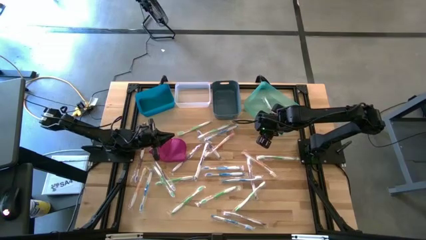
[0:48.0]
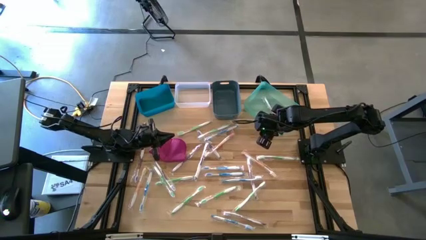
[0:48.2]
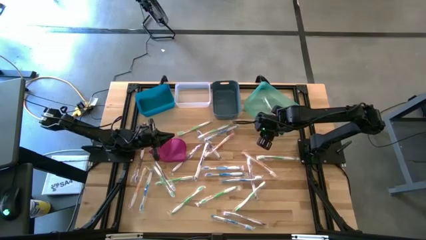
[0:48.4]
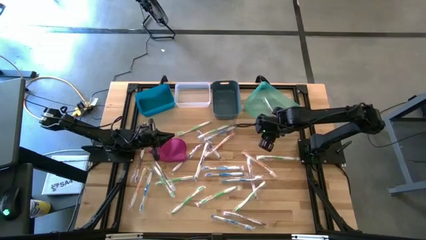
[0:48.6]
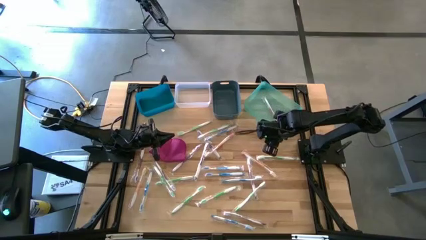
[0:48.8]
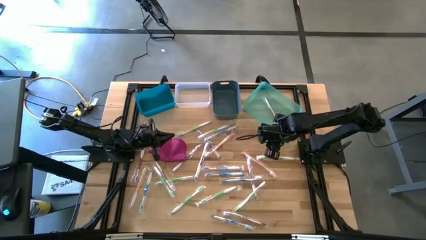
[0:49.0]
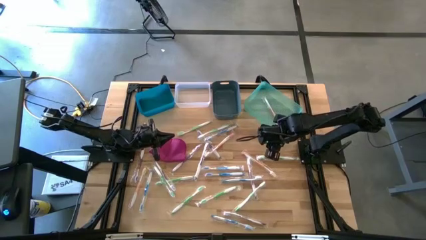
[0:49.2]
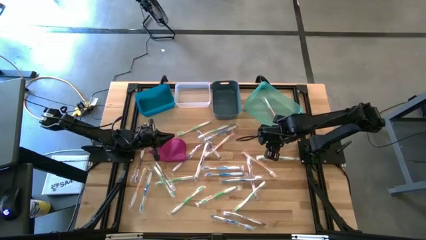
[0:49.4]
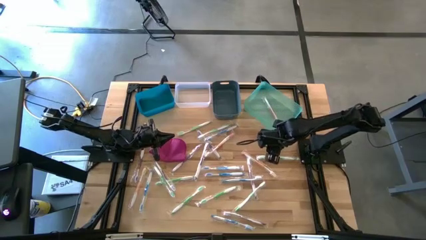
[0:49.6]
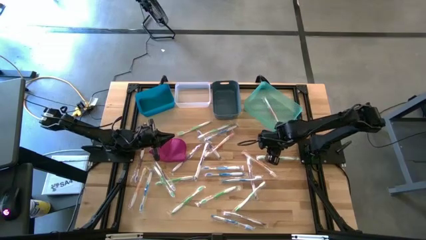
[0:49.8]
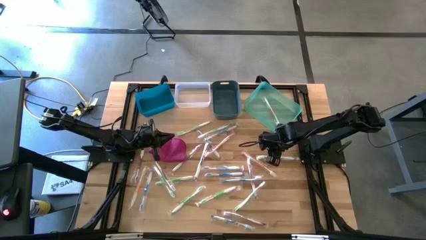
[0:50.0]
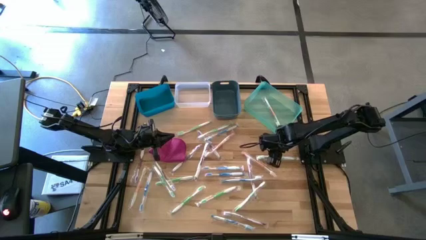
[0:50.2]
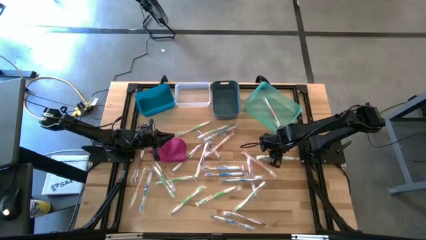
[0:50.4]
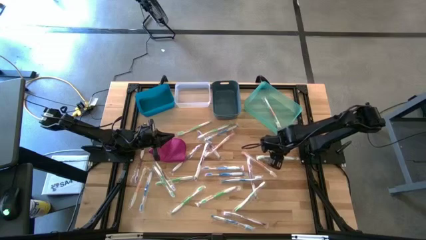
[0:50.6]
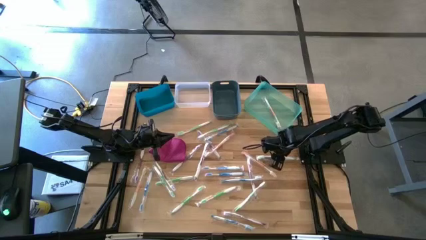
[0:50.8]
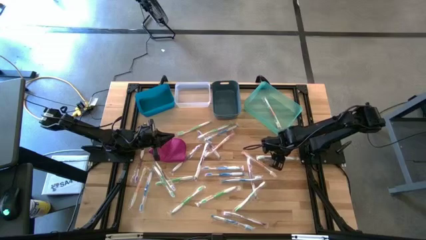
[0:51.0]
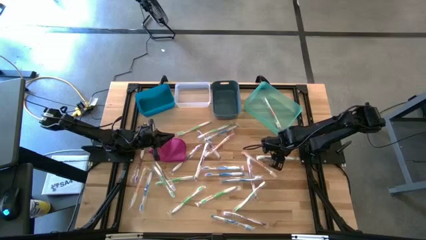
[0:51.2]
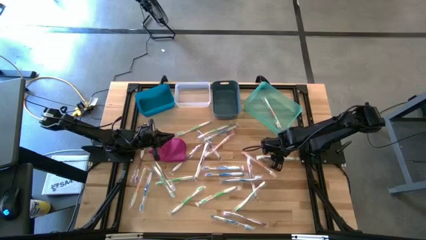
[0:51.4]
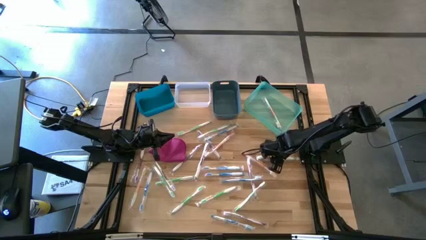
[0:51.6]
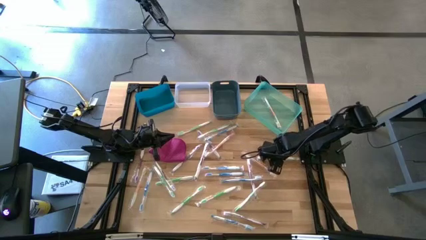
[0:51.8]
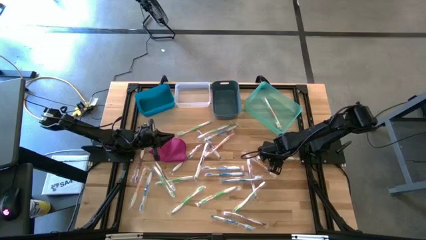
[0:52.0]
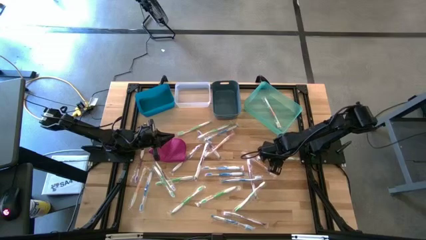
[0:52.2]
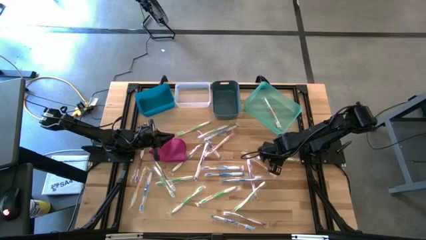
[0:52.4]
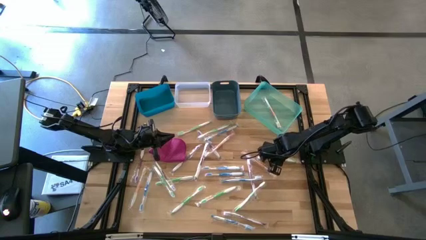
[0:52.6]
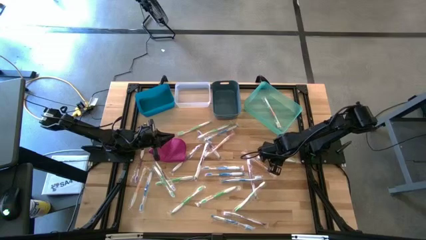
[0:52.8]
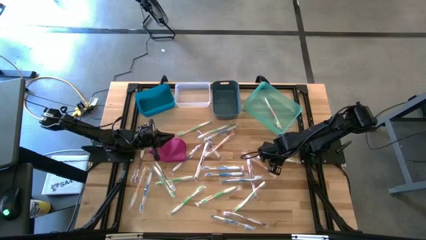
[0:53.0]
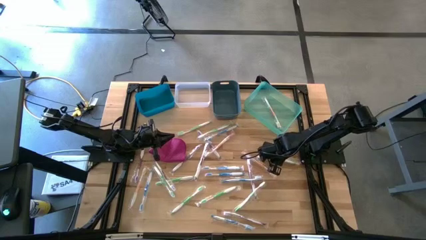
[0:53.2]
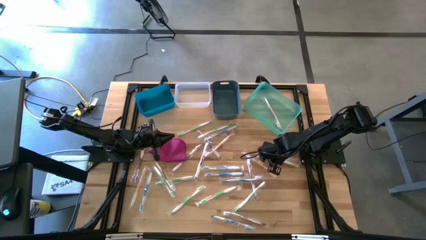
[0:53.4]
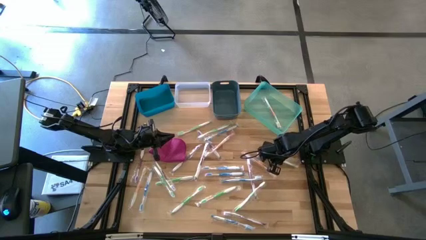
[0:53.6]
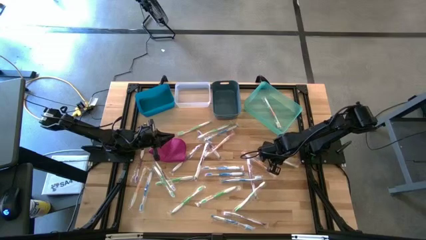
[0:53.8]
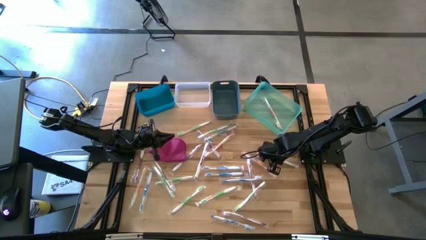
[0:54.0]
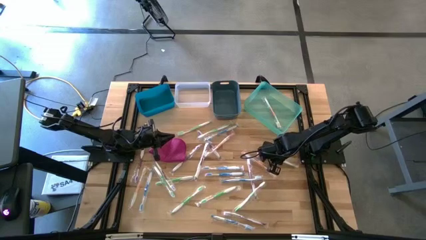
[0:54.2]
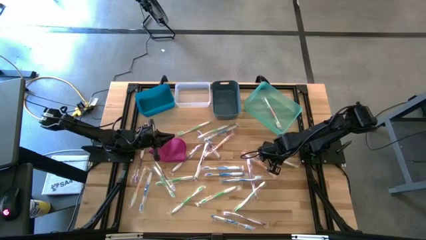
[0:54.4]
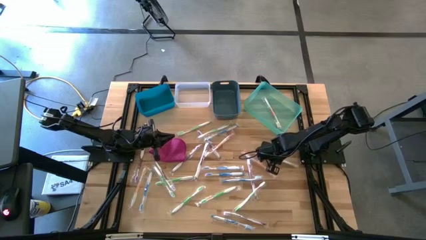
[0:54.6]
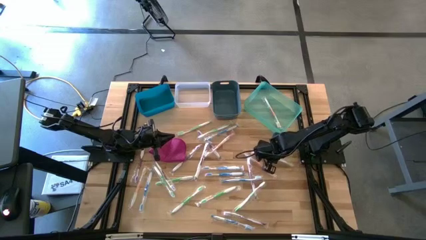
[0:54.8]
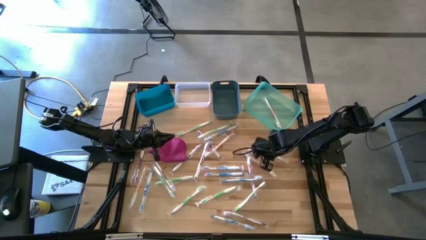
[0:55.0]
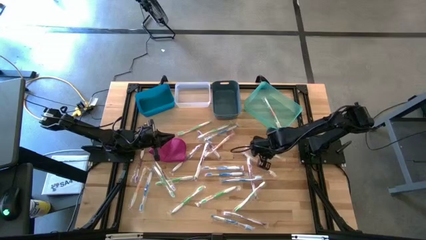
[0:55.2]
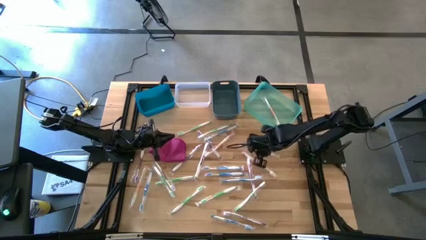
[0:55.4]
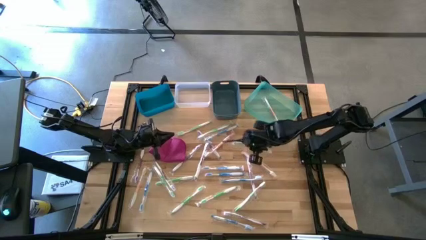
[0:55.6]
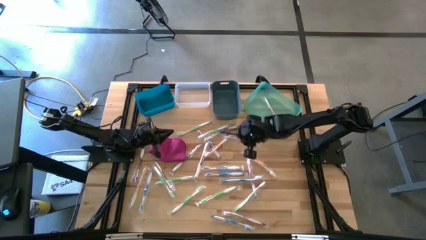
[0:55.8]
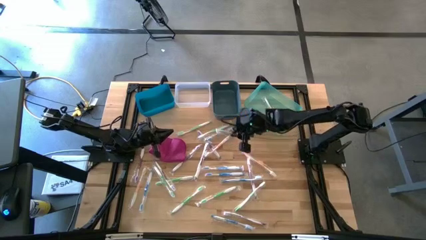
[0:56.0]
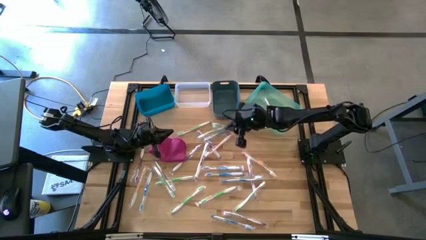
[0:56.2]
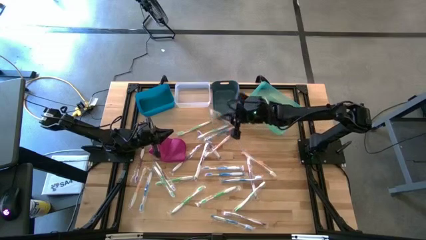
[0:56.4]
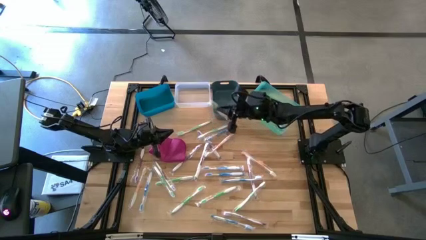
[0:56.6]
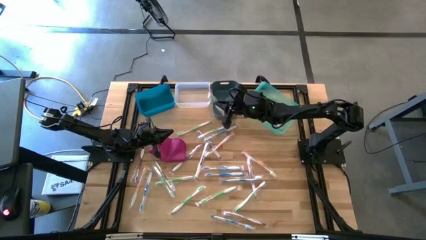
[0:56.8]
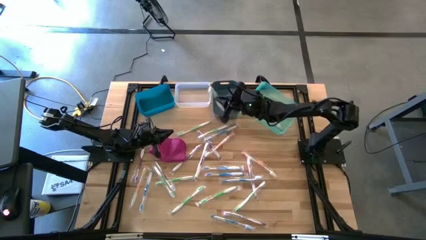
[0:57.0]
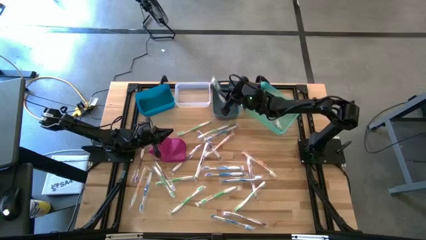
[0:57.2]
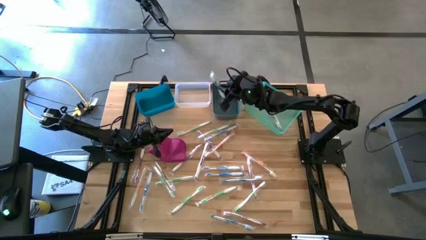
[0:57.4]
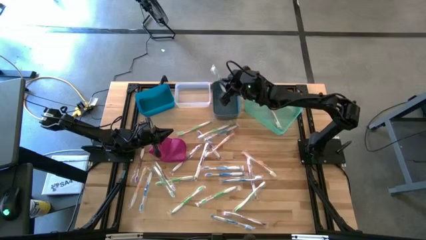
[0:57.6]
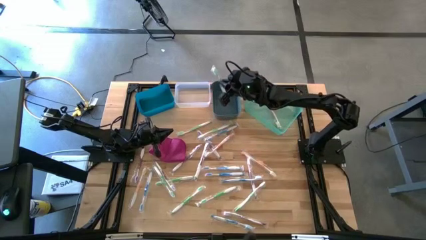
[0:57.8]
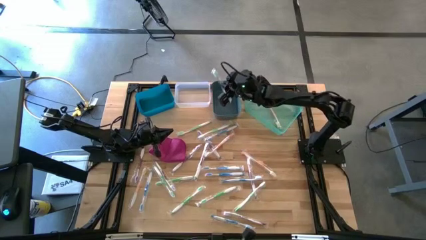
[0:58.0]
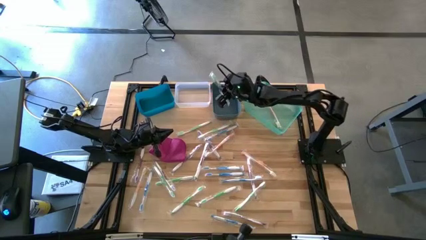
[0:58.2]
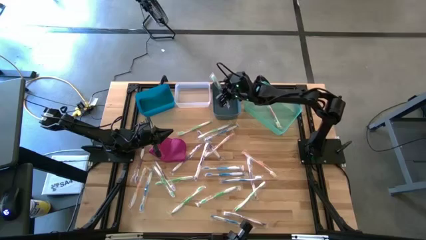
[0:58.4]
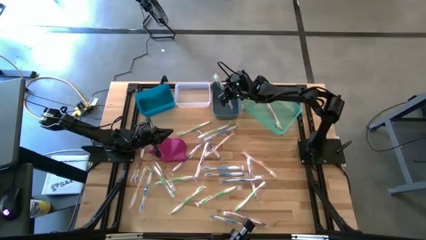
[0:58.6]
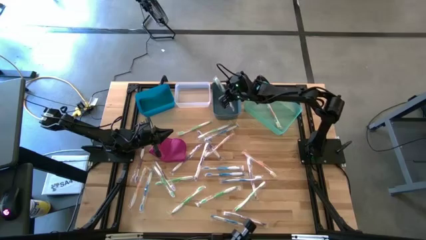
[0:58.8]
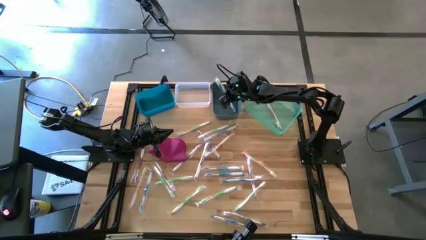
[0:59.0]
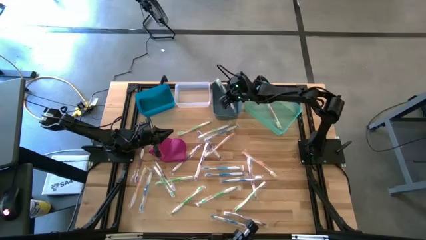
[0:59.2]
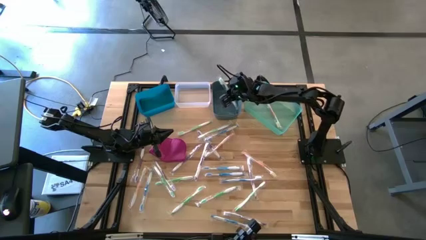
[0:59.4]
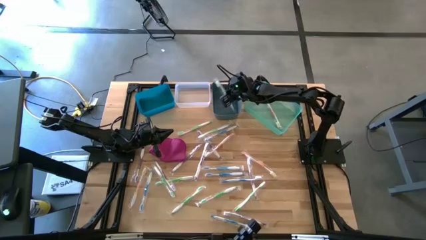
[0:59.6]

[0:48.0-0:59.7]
Task: Pick & Place Toothbrushes
Put the green toothbrush into the dark blue bin

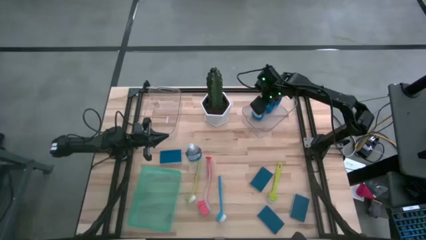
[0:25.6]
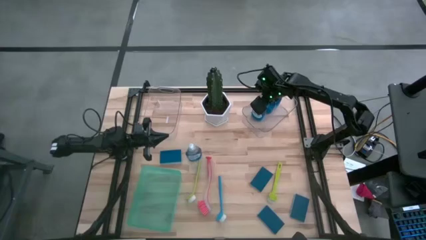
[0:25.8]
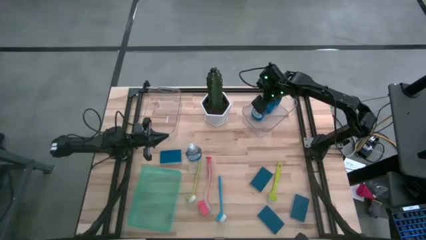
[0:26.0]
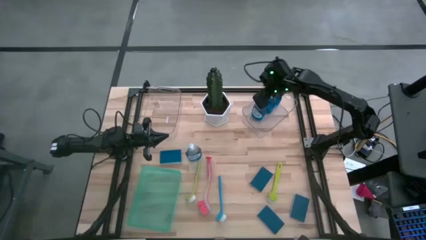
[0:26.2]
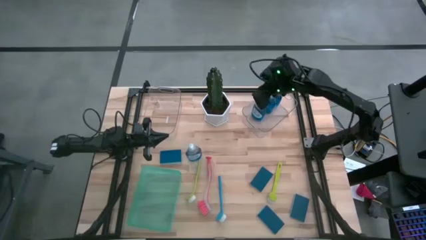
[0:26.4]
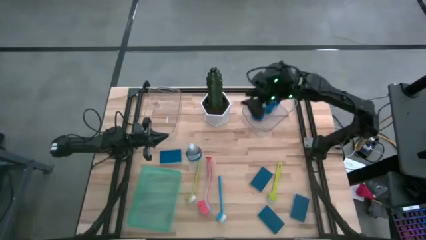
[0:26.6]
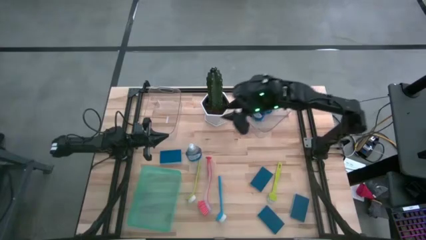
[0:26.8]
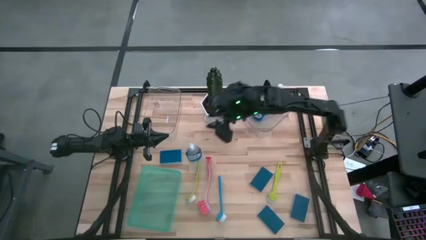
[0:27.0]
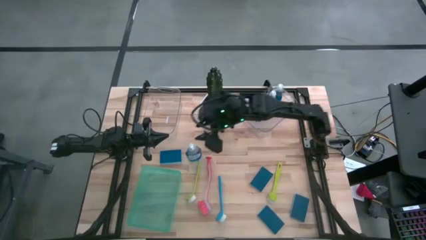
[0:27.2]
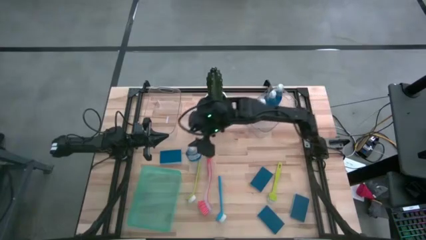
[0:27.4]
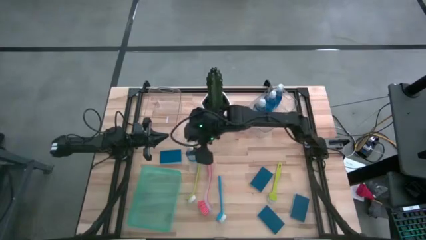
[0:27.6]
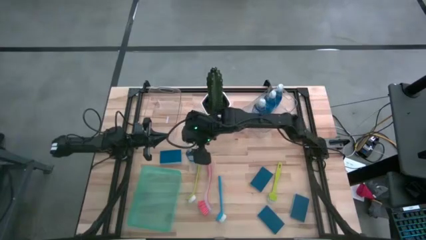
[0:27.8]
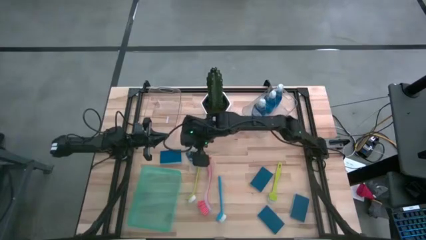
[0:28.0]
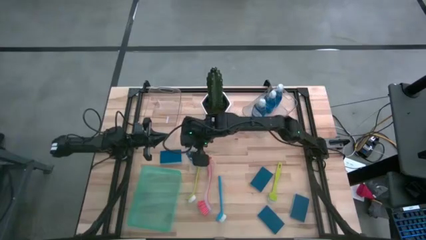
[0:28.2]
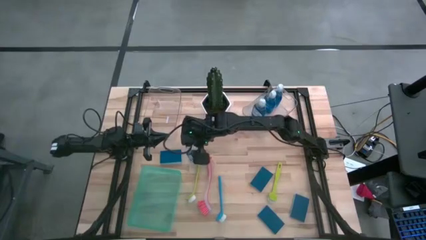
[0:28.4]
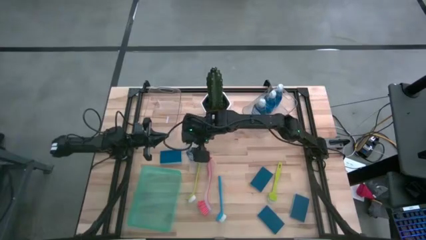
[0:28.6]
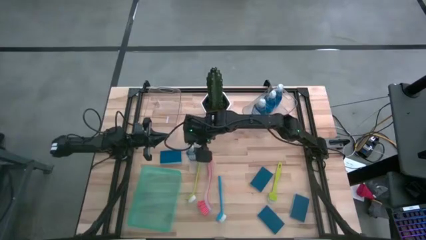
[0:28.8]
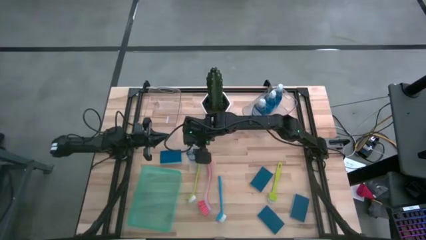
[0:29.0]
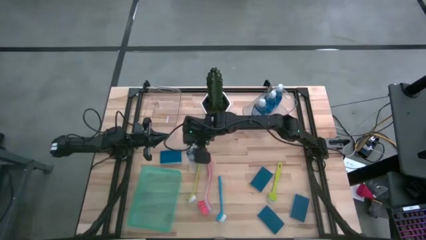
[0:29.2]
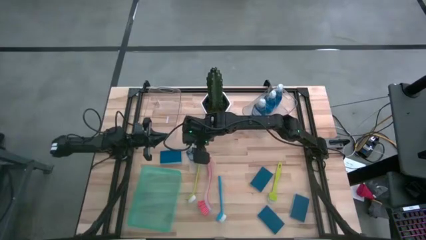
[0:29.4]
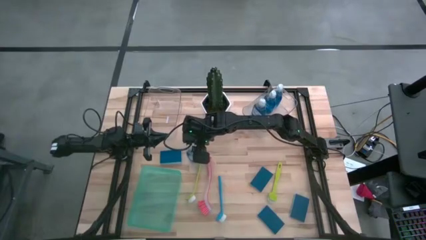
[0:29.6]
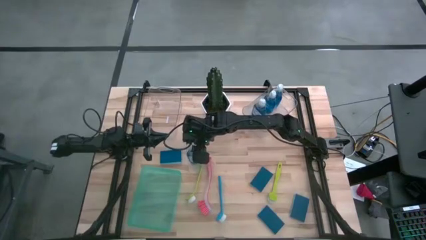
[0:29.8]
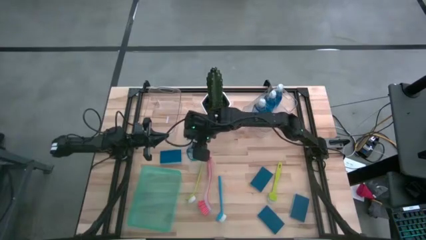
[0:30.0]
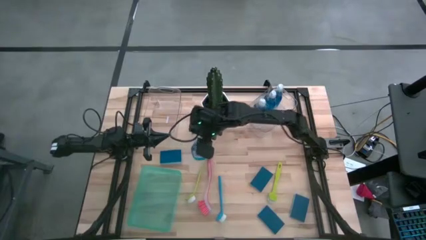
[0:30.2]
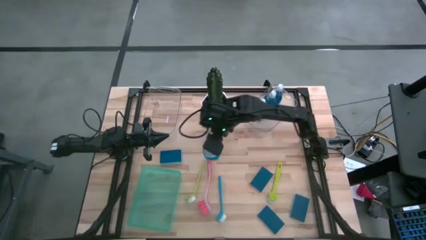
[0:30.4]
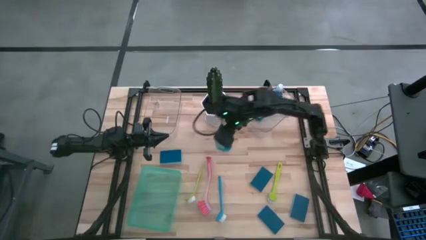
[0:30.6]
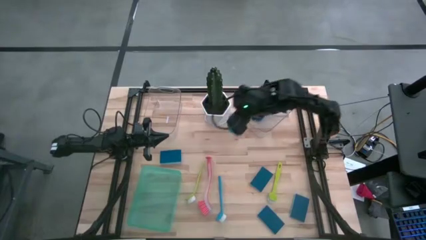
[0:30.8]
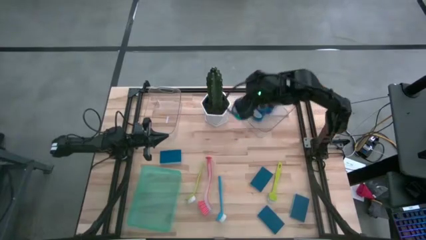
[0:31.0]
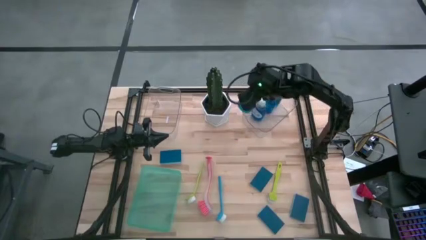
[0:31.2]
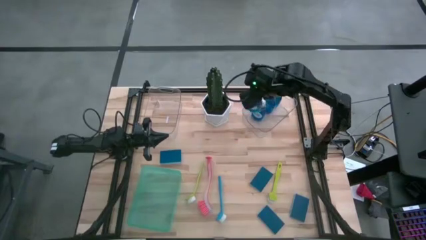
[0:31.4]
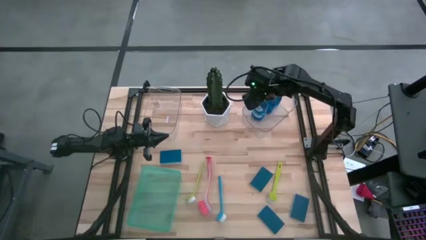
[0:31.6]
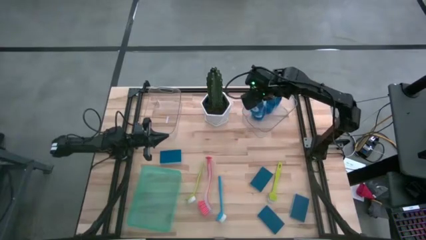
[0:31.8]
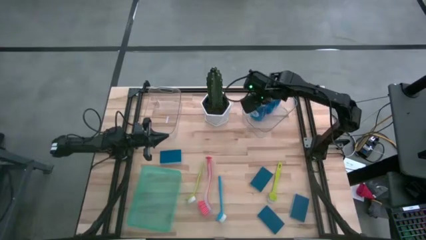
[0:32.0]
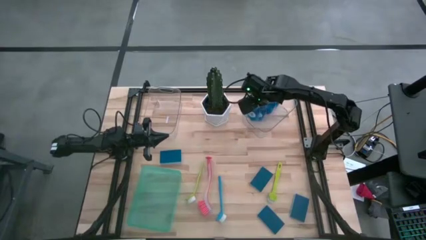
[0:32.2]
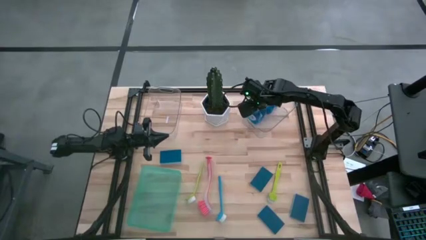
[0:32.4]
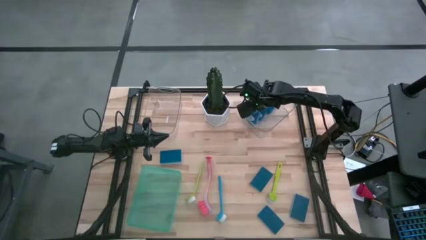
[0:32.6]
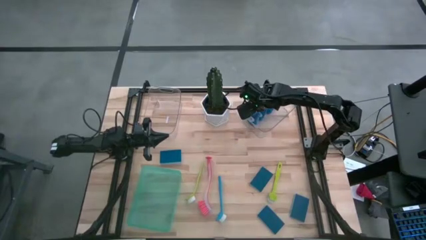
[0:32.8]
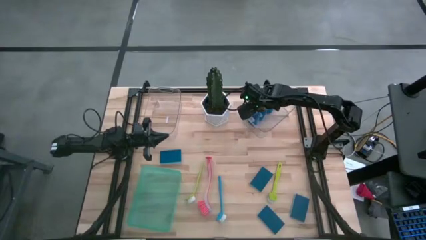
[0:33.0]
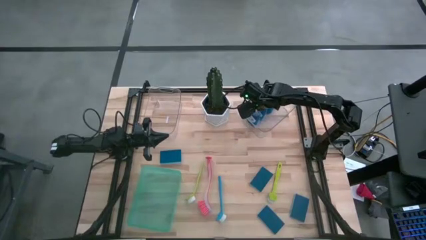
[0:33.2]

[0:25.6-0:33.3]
Task: Pick & Place Kitchen Sink Supplies
Put the dishwashing liquid bottle into the right transparent bin
